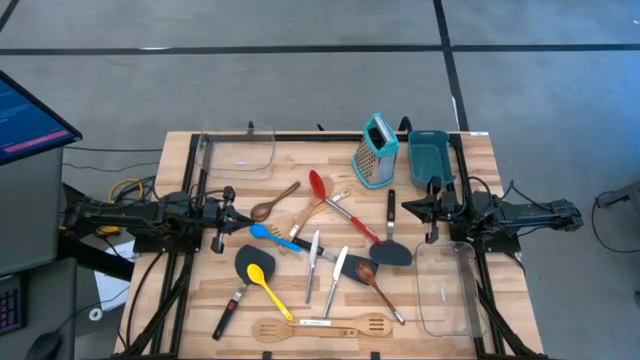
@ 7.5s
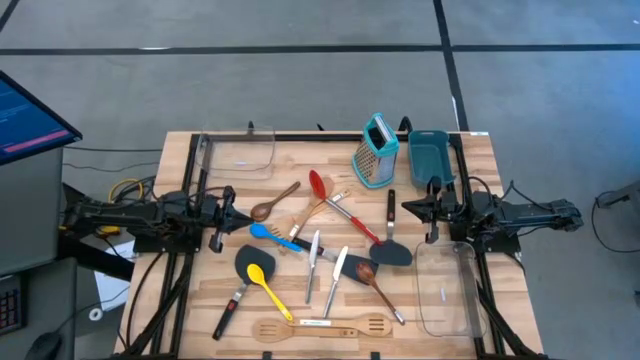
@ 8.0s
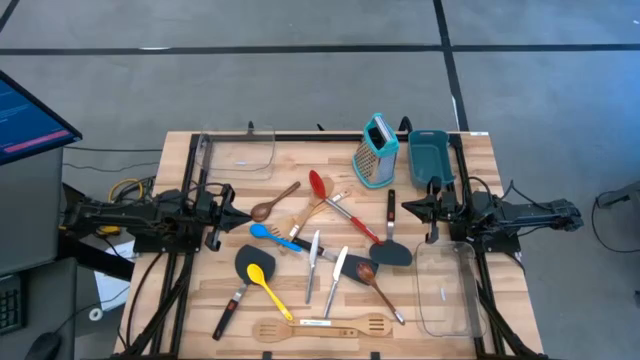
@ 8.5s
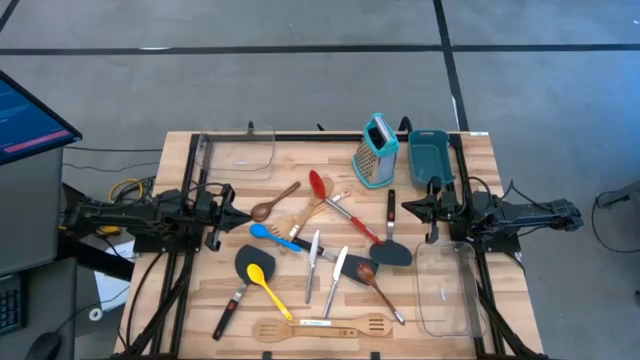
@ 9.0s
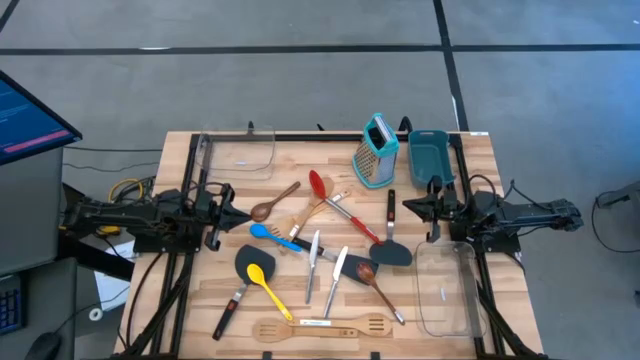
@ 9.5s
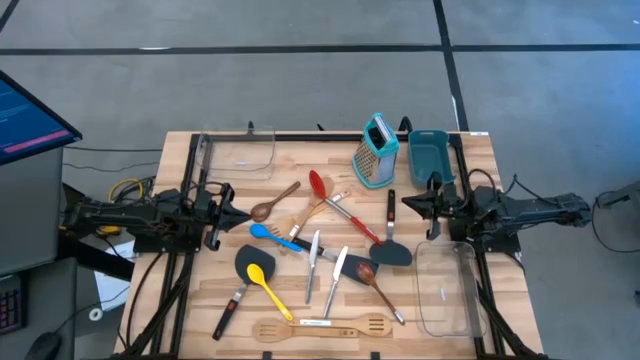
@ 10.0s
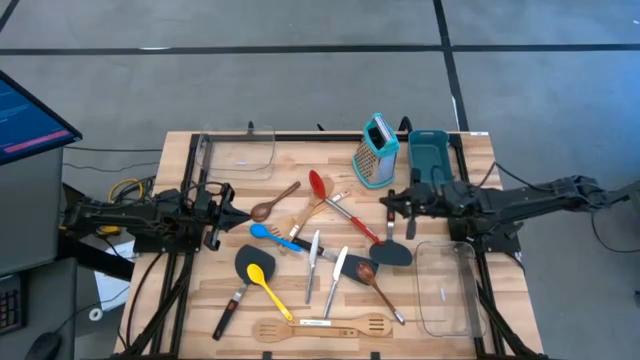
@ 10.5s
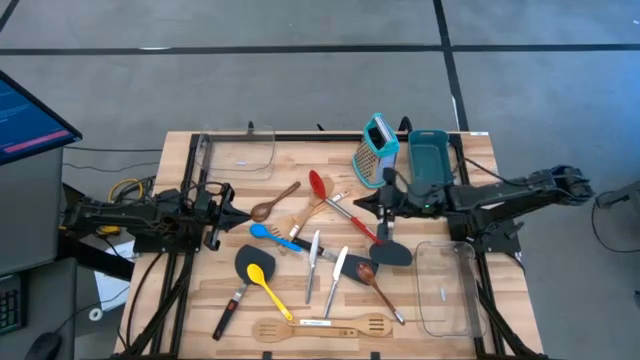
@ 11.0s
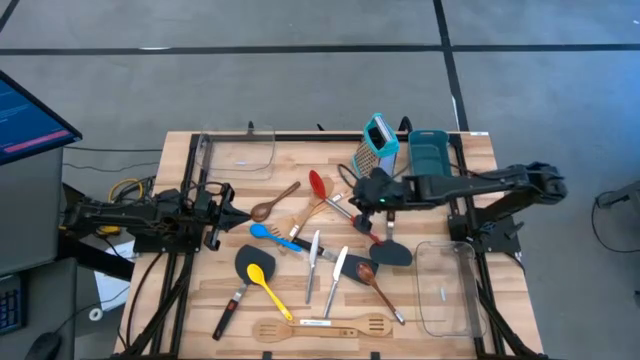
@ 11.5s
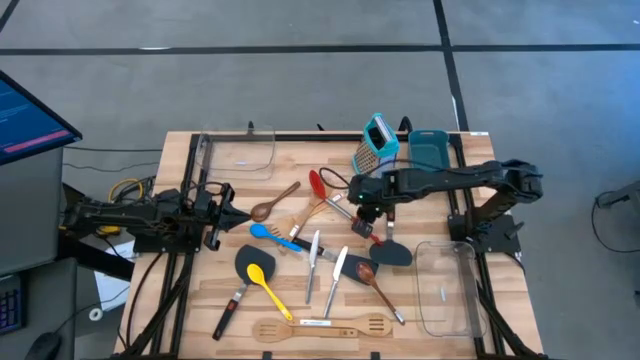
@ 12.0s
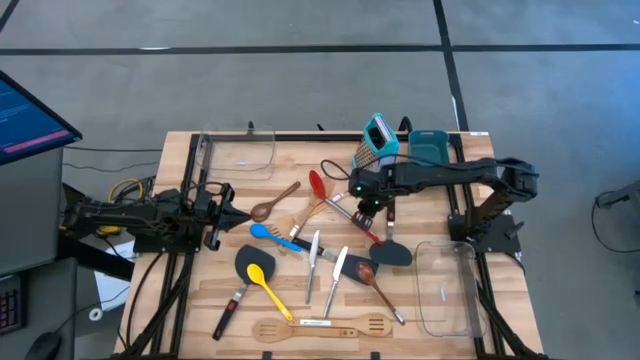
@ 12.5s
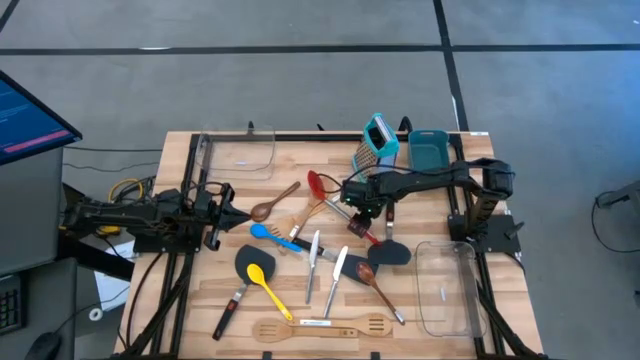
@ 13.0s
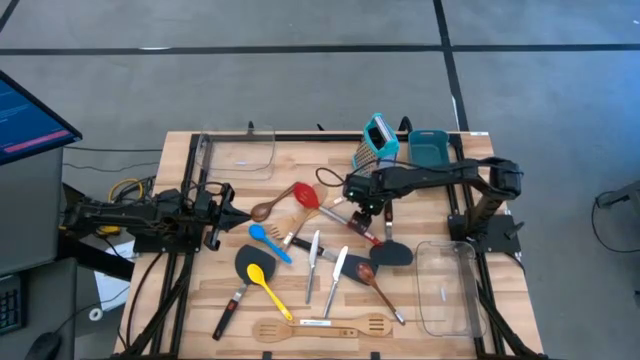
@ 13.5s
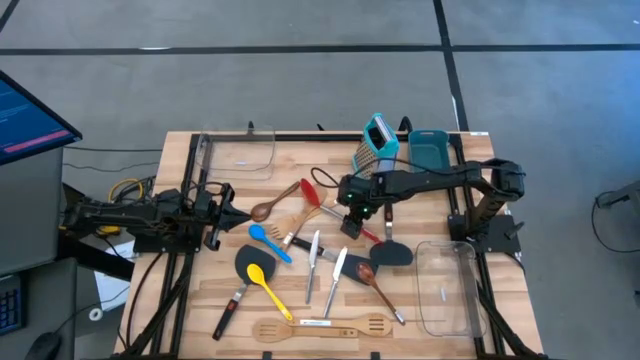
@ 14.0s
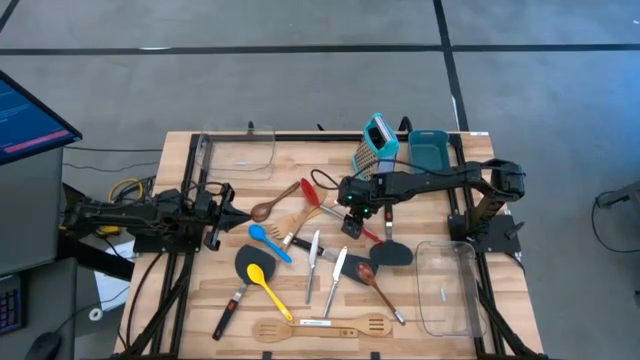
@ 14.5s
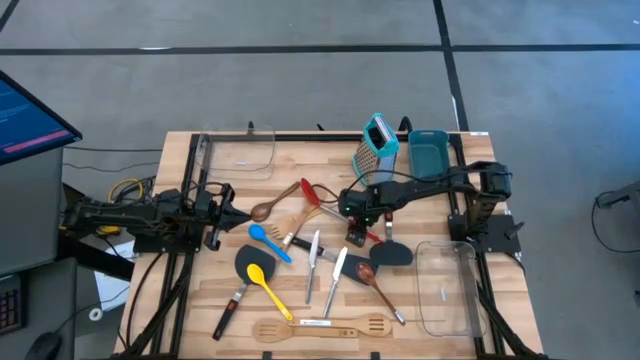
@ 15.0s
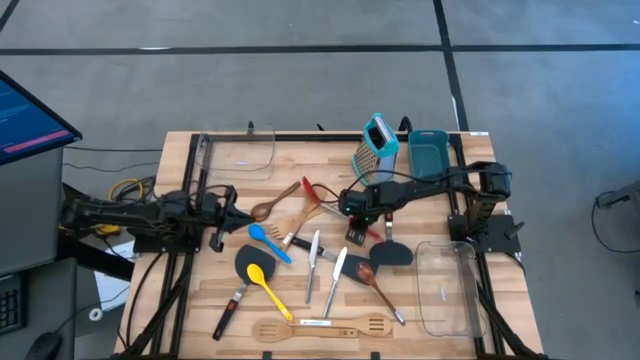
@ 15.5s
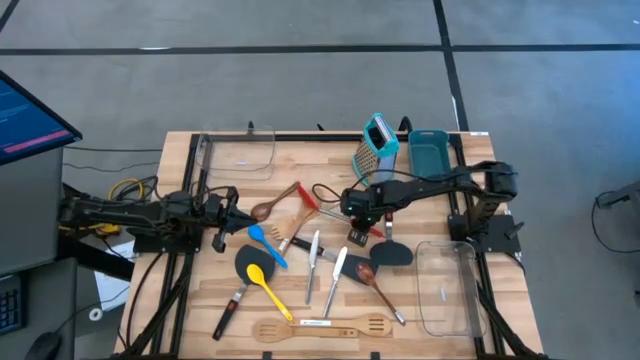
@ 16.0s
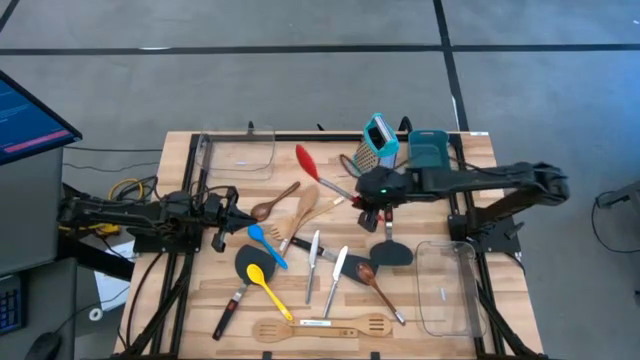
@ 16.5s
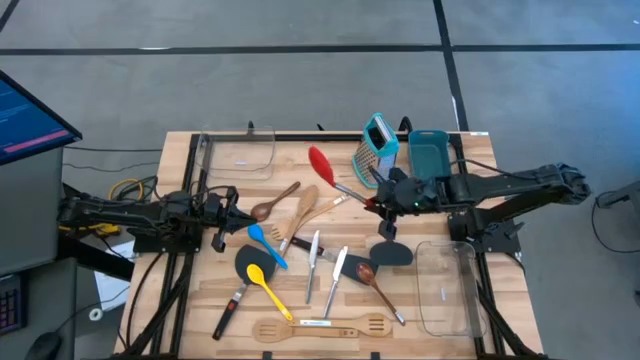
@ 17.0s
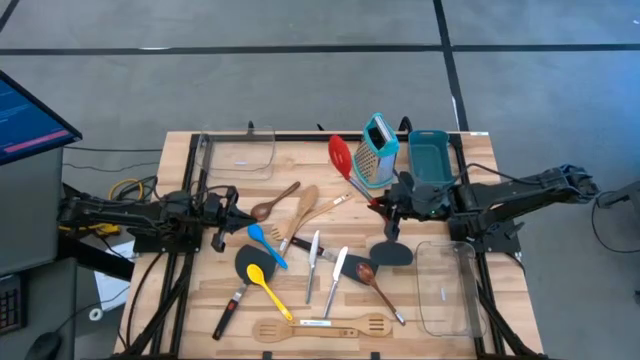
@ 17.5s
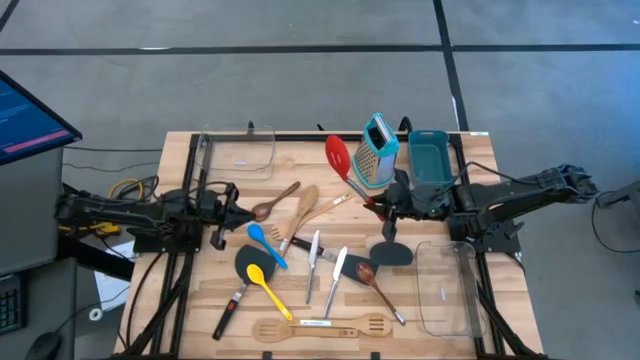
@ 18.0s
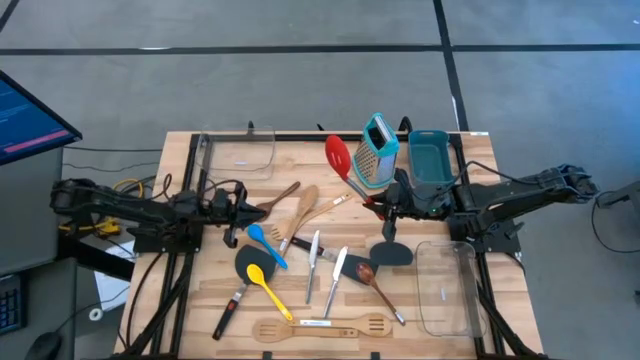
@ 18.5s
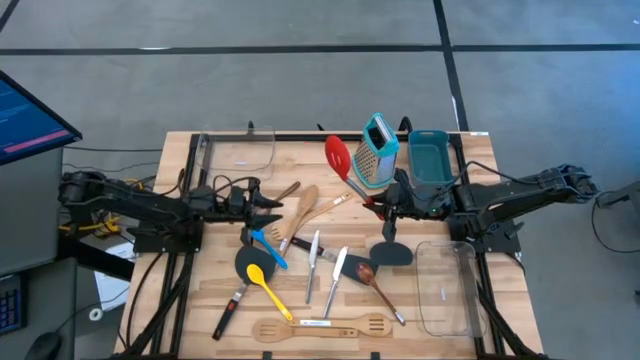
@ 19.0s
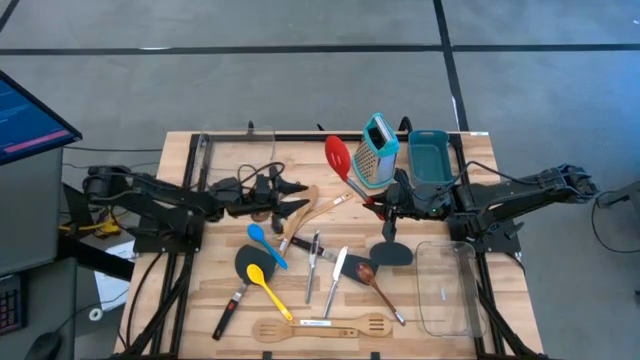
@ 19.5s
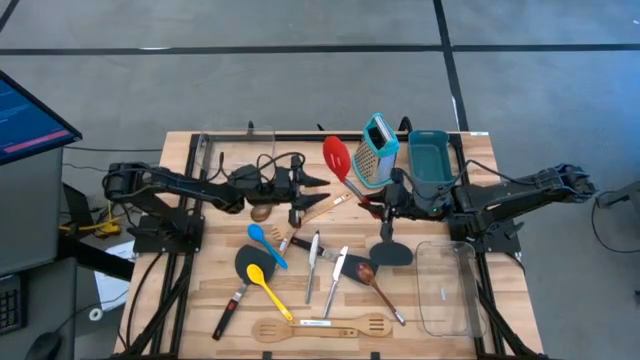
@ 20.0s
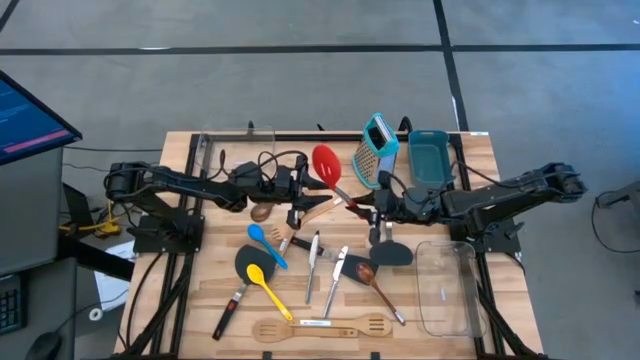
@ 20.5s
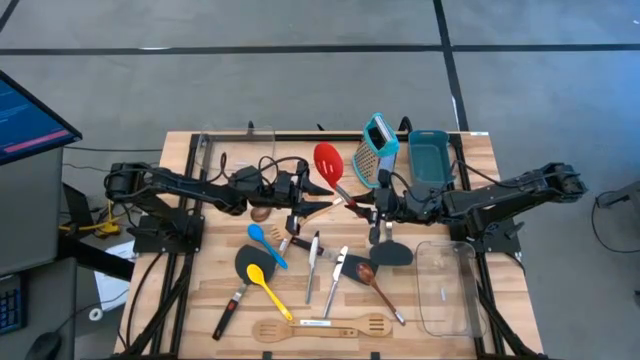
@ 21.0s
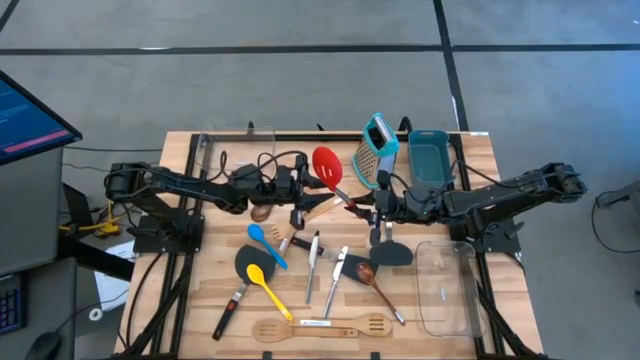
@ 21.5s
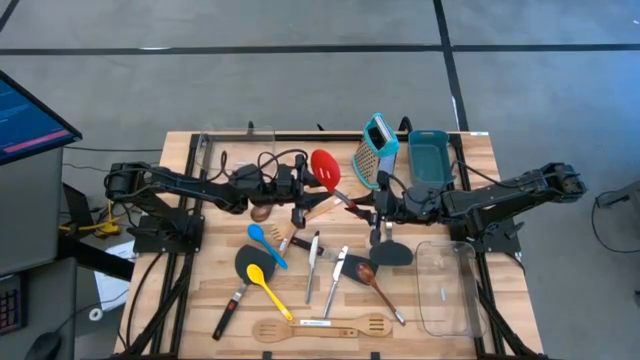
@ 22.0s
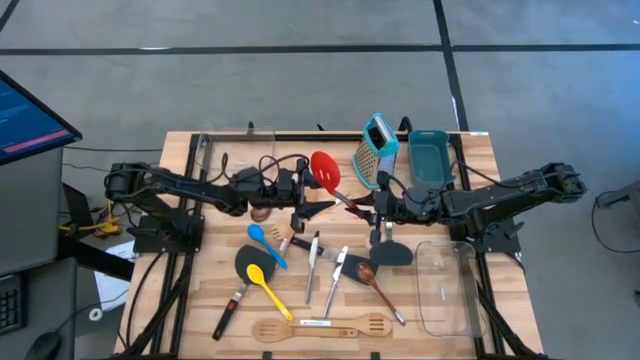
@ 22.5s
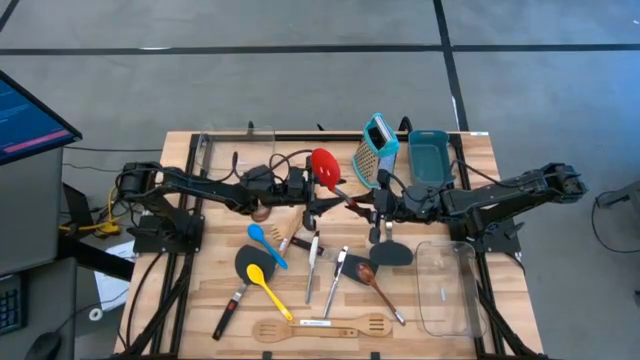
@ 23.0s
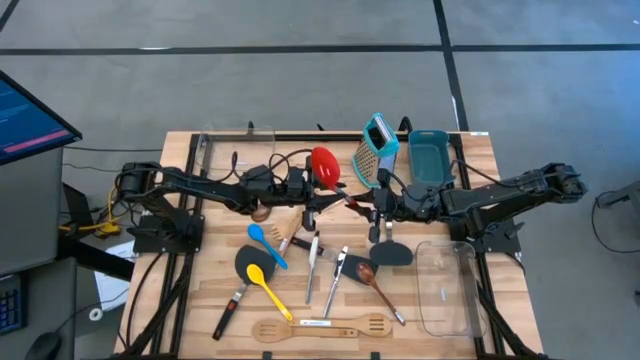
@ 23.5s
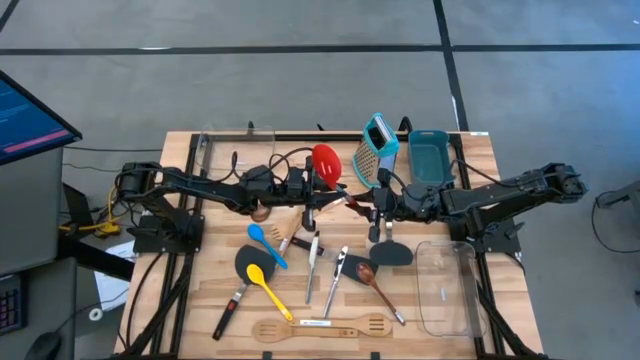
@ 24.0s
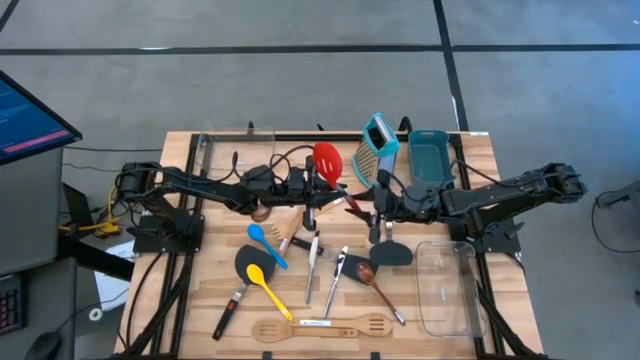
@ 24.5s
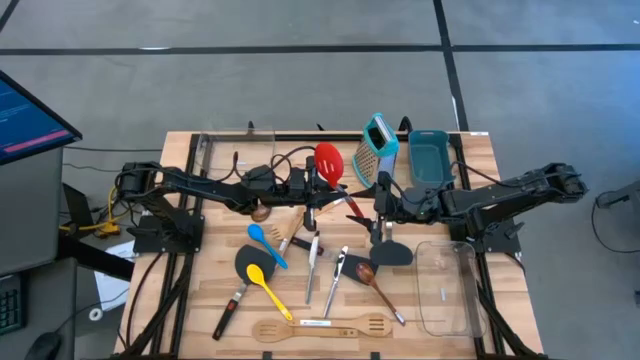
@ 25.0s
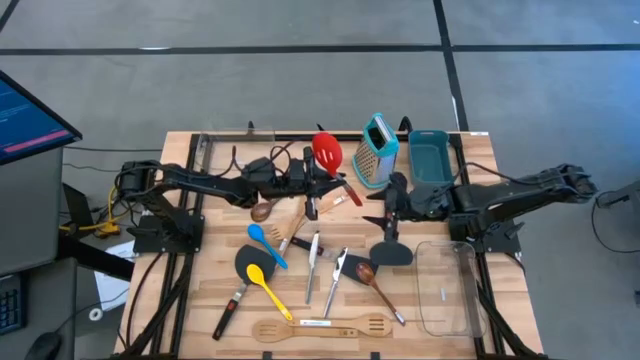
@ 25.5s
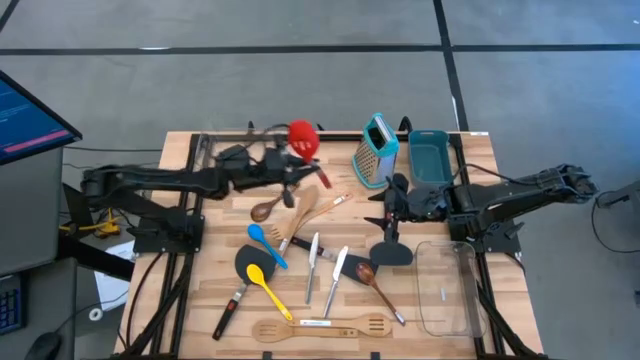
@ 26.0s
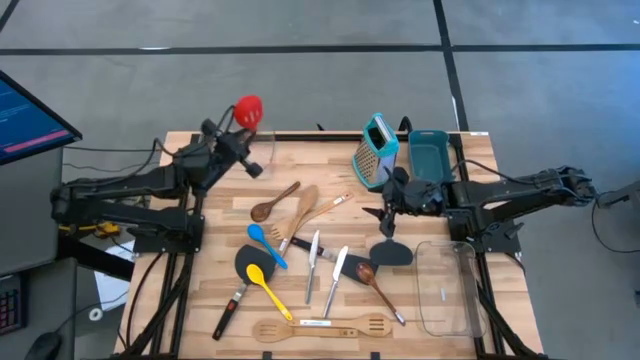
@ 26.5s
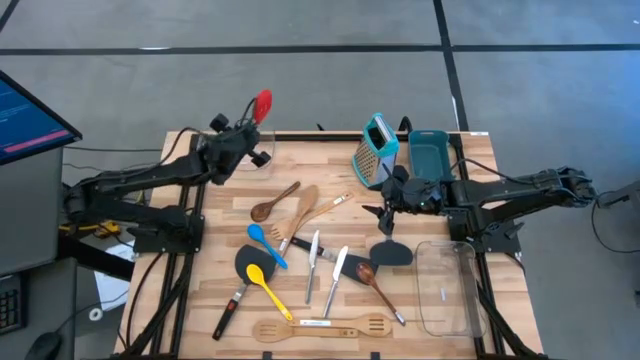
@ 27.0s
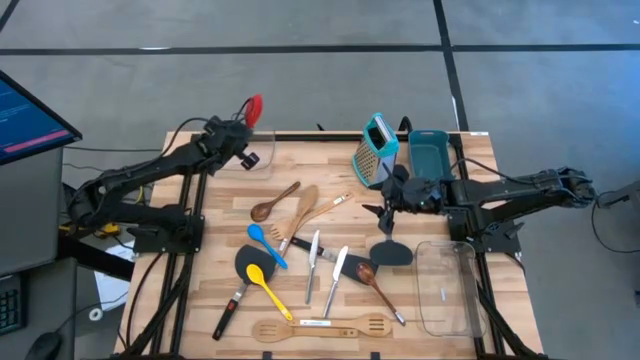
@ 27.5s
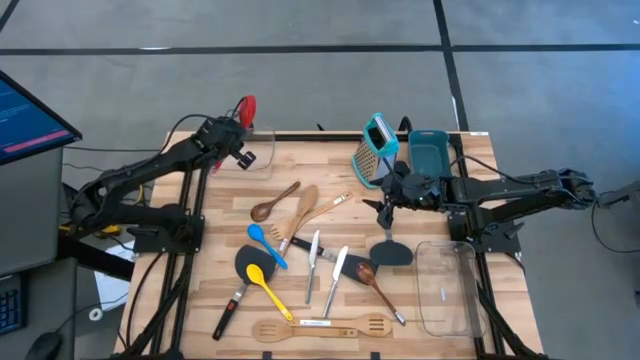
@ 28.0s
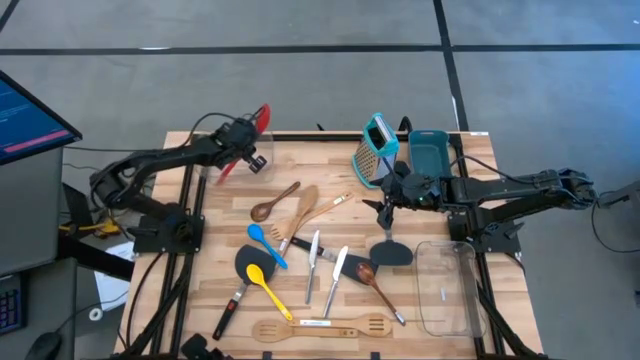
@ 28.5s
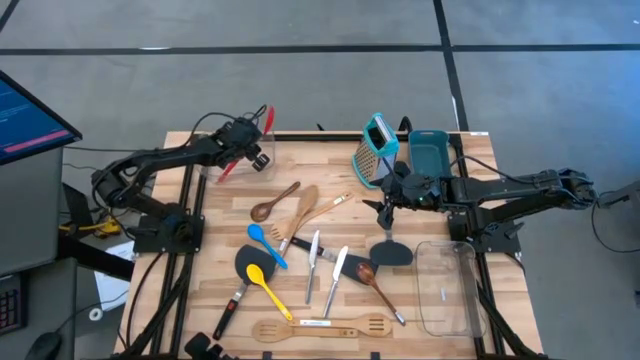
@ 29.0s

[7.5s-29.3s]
Task: Pick & Place Kitchen Items
Put the red slotted spoon into the left transparent bin
